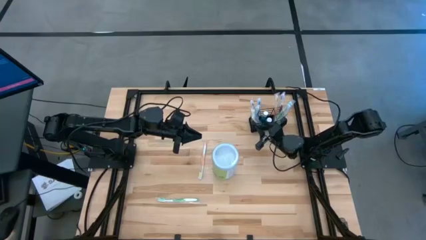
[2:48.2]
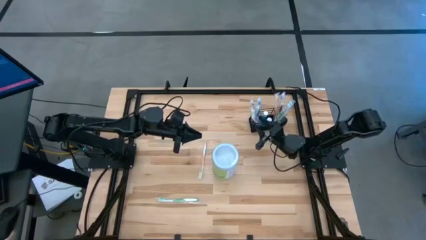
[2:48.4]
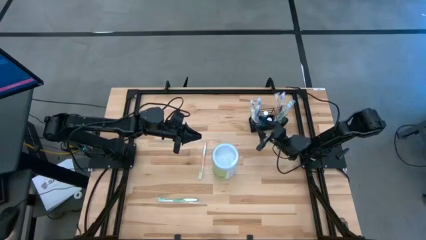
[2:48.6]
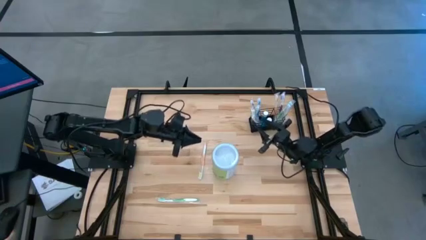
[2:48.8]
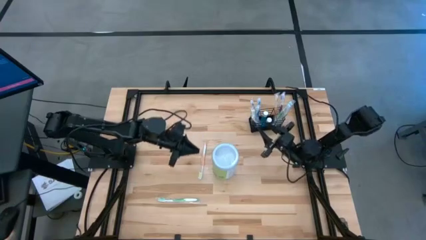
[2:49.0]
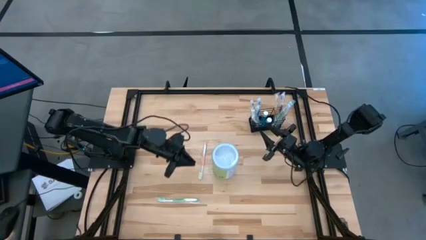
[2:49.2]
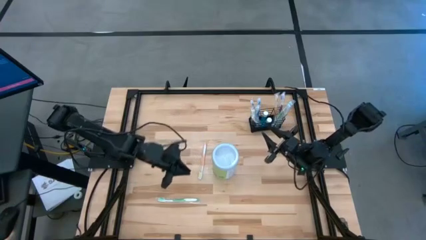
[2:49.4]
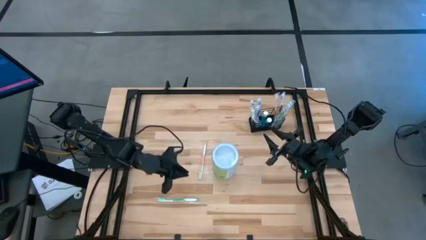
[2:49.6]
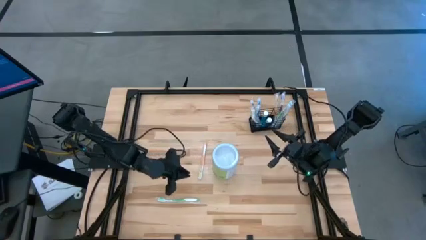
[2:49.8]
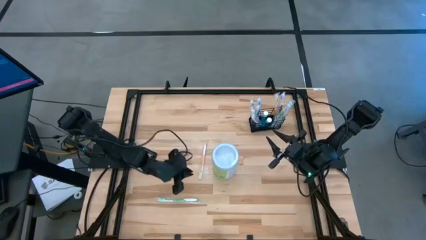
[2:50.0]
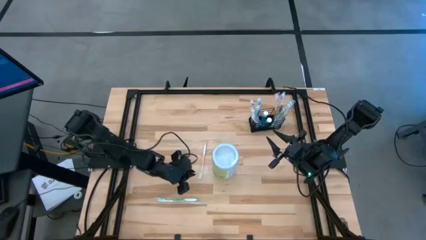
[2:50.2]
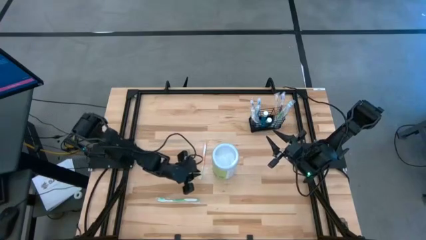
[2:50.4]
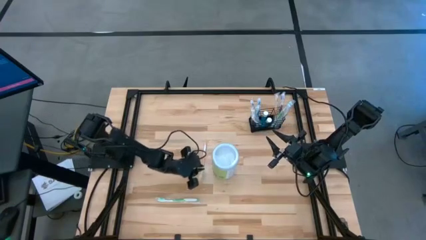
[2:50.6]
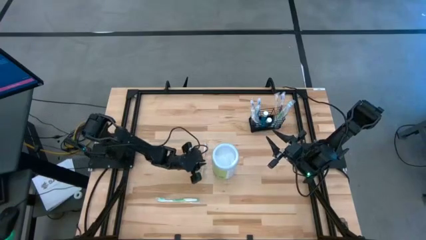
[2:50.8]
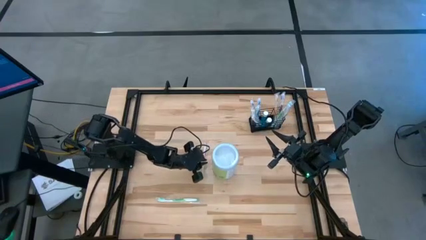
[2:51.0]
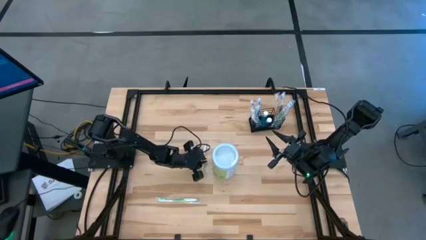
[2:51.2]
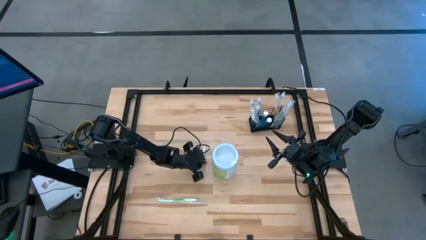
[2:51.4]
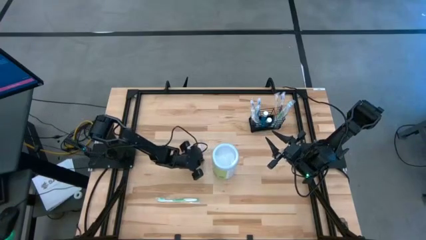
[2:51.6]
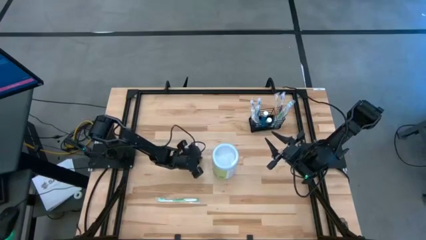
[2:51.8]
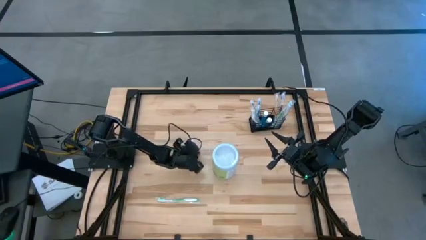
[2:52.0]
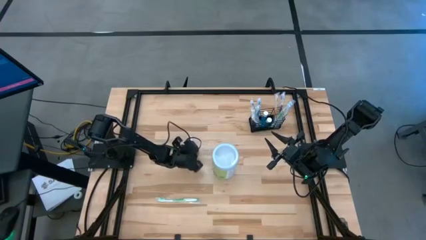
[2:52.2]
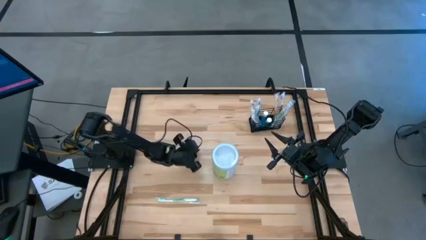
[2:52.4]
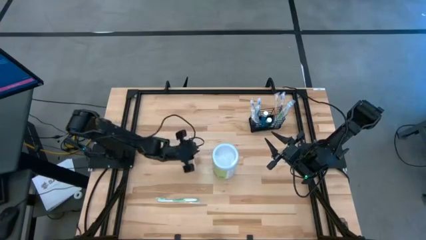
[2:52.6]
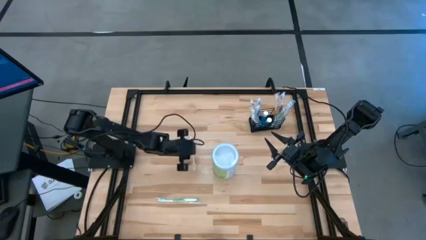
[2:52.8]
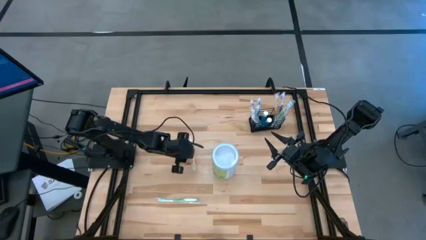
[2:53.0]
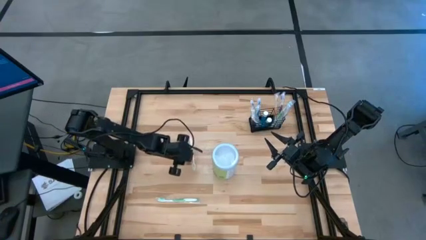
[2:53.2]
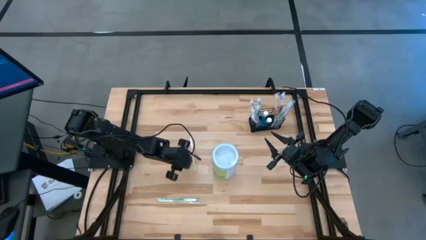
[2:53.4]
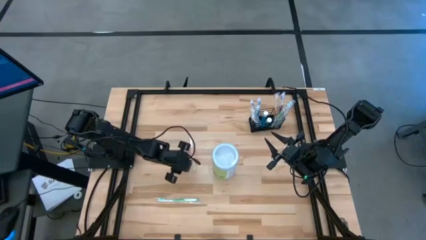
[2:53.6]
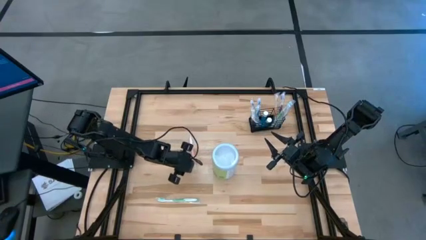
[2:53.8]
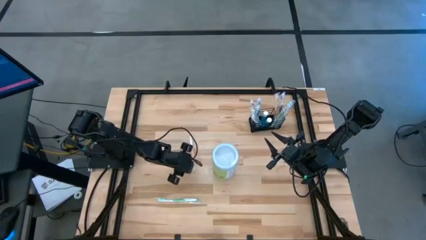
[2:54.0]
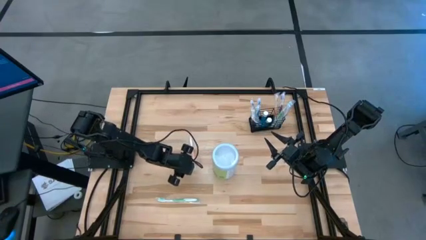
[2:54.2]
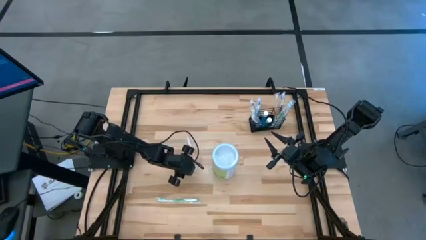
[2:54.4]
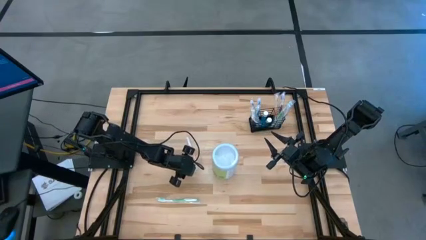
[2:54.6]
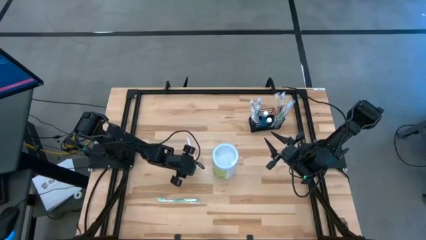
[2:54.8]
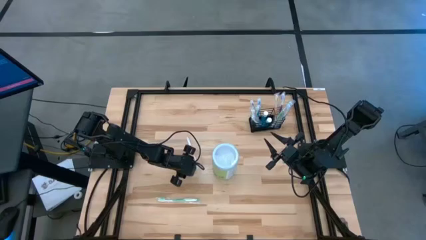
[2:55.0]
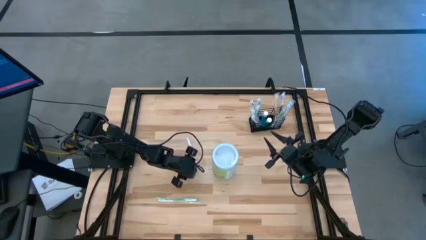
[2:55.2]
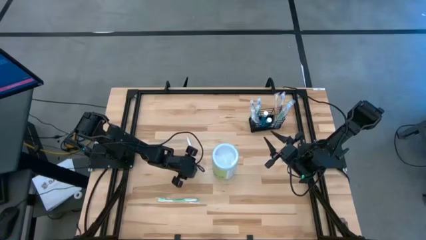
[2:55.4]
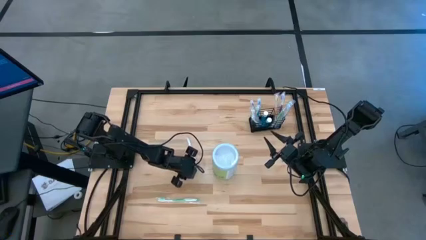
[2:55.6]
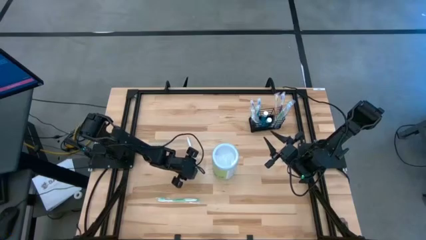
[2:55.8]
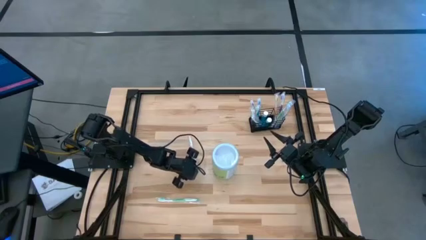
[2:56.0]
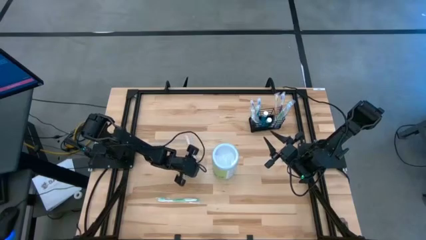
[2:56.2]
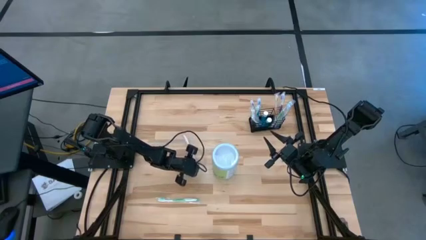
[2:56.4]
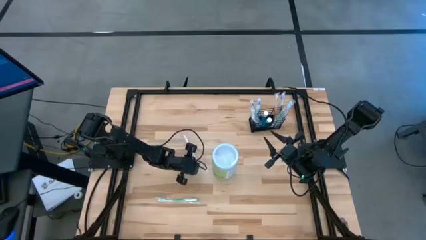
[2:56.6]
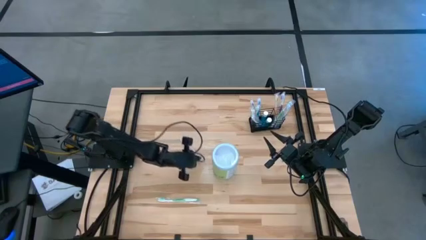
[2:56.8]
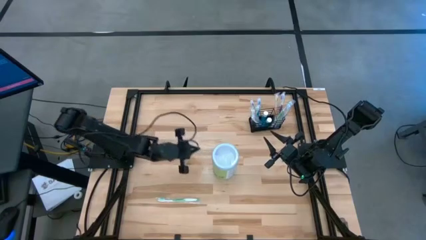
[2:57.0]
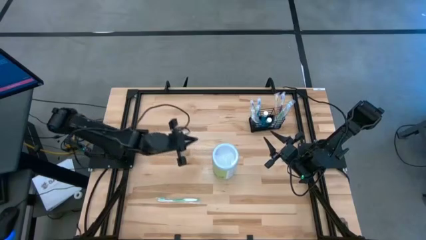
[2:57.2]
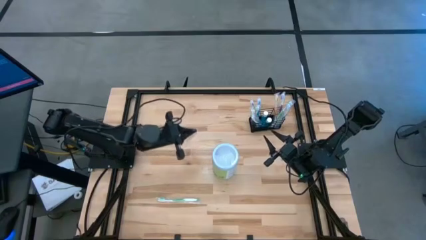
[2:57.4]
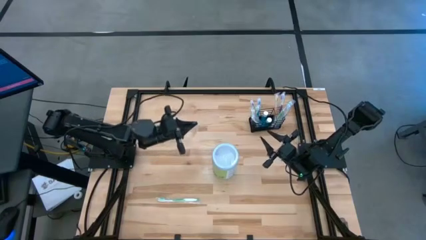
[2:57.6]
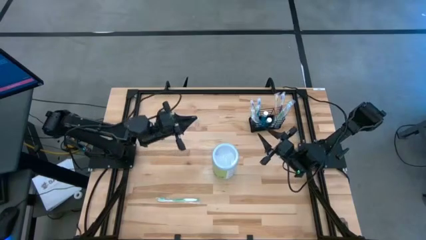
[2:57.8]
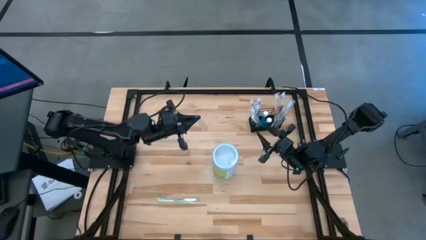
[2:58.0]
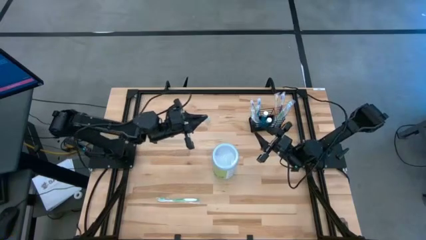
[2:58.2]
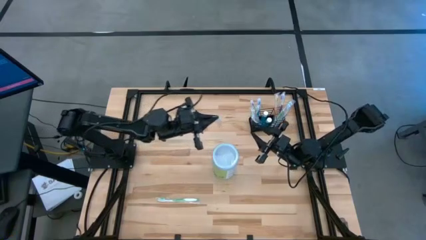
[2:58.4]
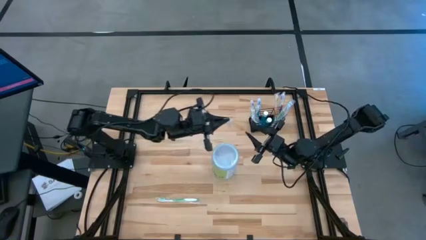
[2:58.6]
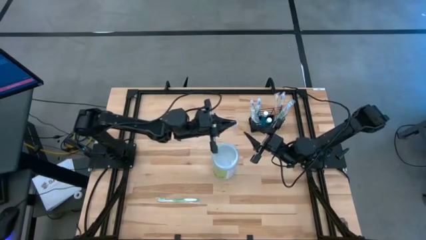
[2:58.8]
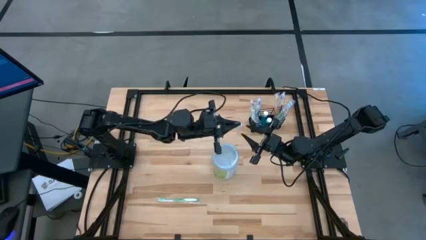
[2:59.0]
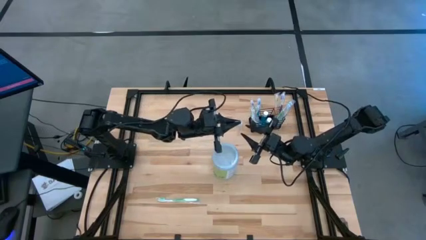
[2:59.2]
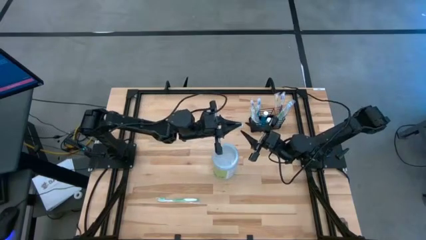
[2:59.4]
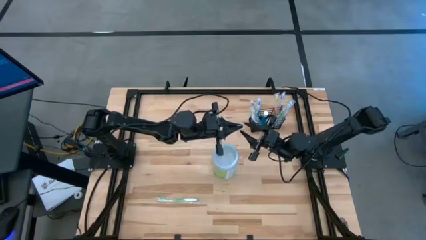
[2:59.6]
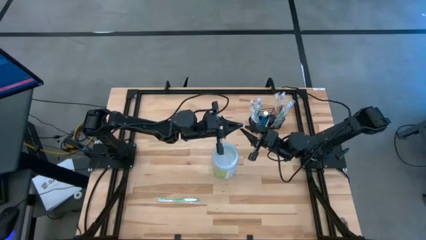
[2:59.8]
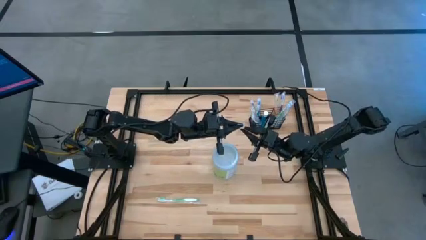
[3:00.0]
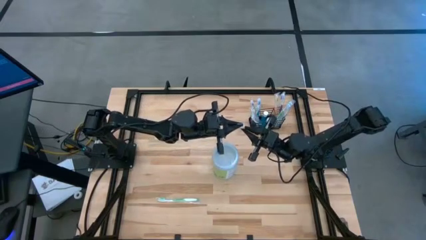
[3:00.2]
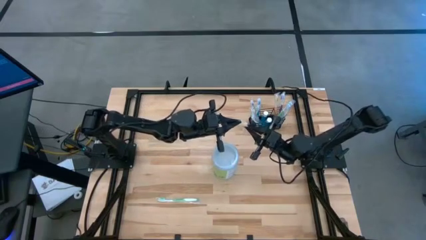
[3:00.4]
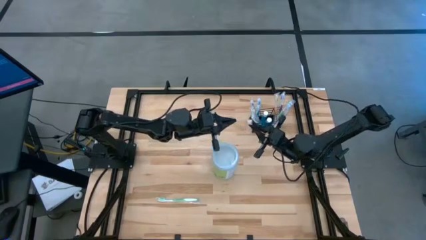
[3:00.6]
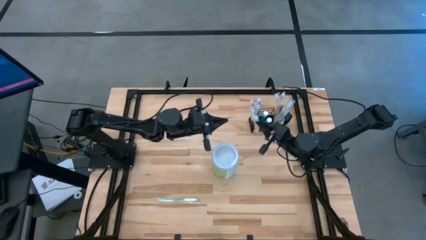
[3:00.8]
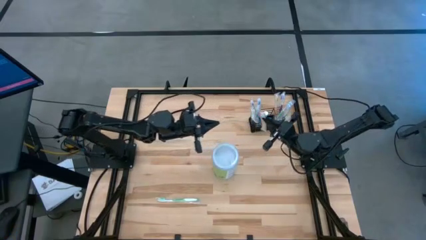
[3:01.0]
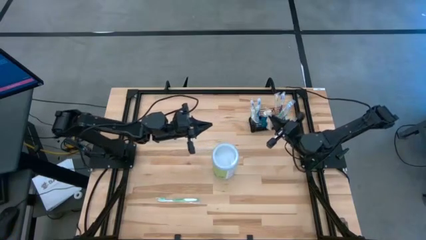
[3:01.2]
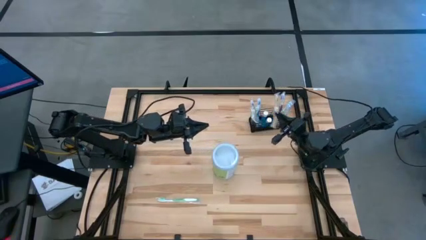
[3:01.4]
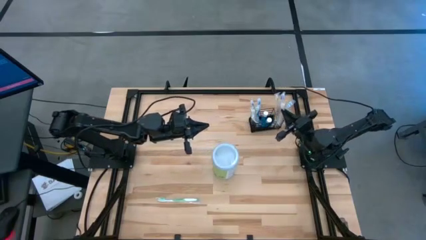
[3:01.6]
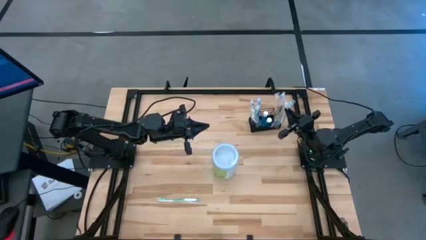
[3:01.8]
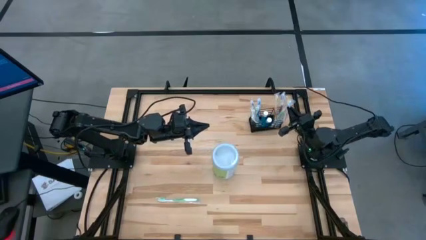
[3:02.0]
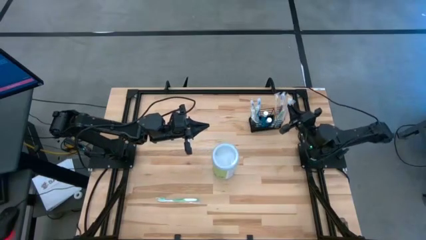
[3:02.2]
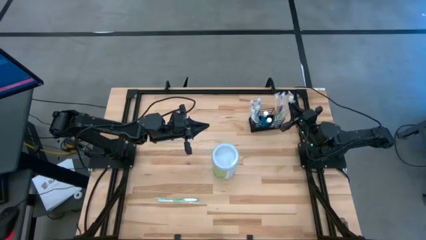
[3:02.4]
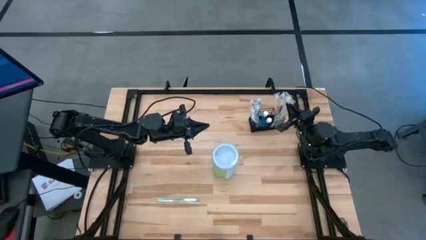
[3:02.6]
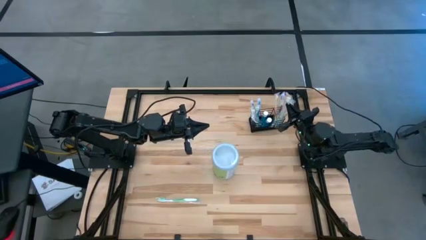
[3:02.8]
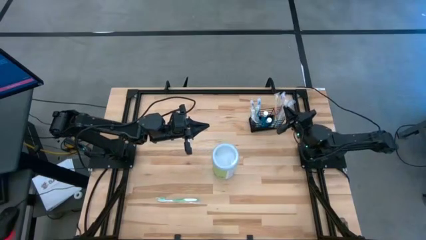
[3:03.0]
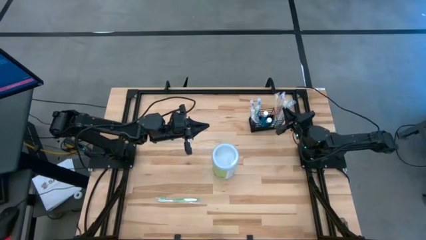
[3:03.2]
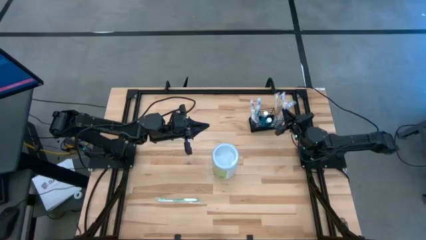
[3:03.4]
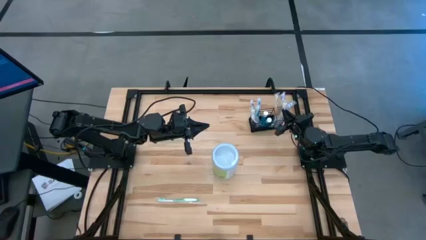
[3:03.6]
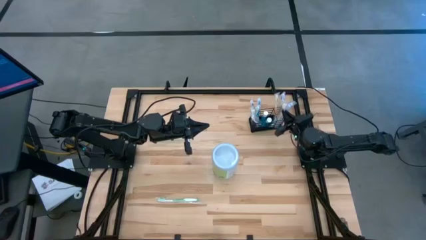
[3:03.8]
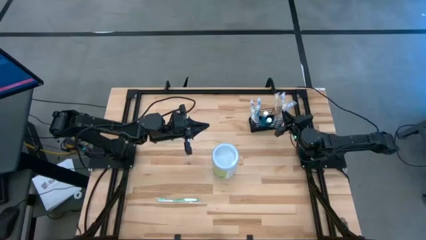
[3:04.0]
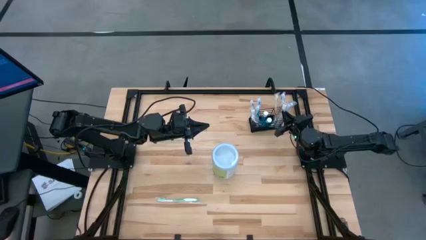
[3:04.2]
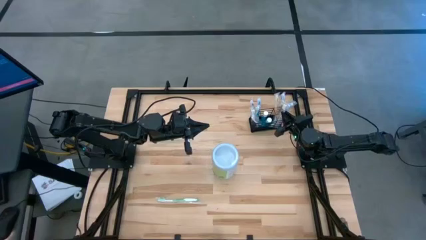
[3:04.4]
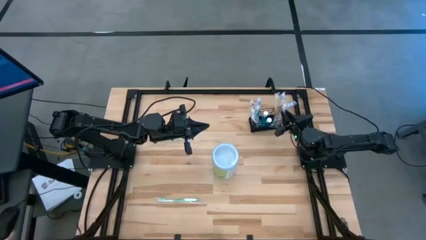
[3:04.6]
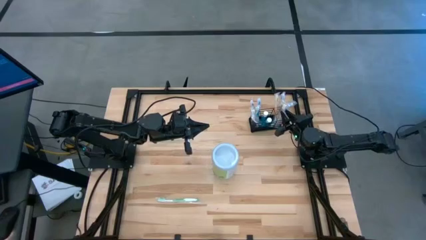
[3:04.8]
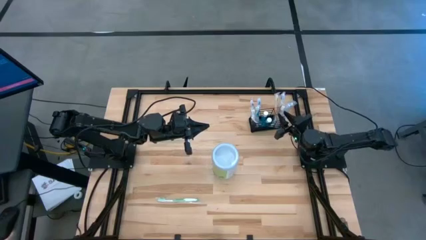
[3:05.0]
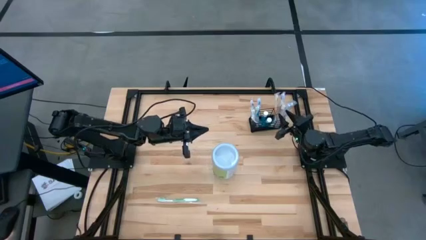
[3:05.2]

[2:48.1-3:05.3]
Task: Pick & Place toothbrushing station
Put the orange toothbrush into the wire organizer
